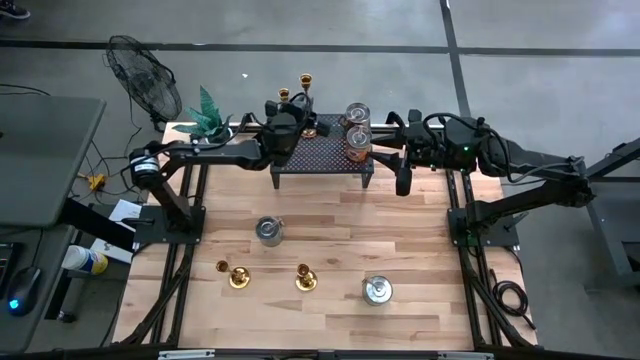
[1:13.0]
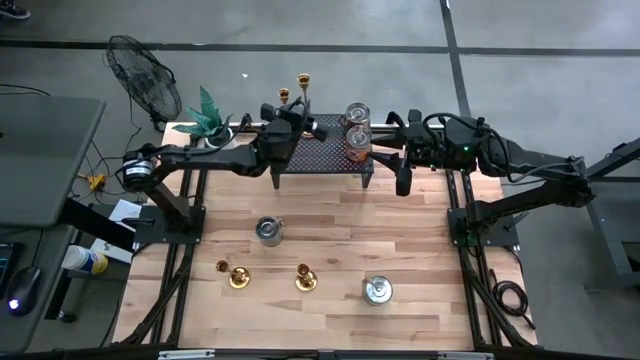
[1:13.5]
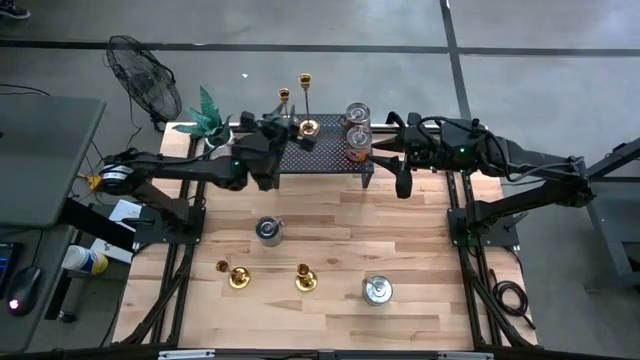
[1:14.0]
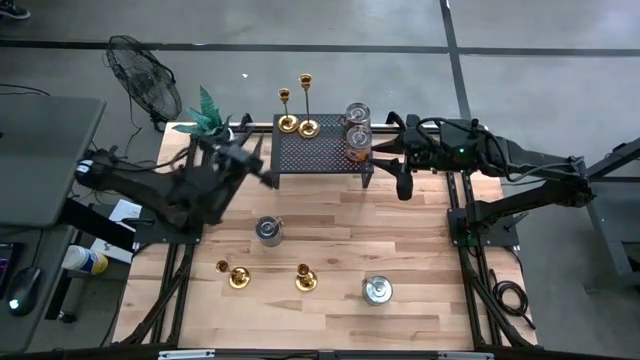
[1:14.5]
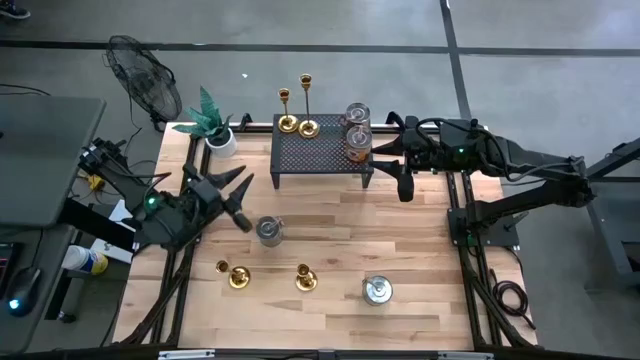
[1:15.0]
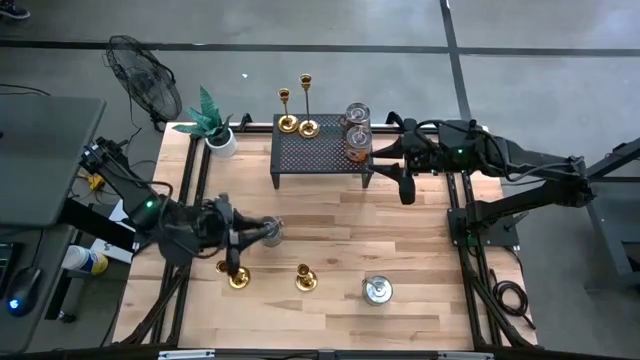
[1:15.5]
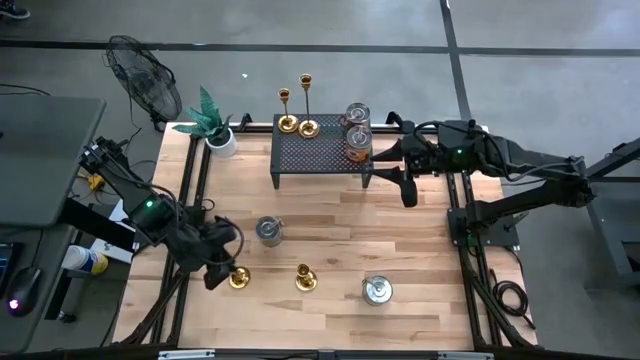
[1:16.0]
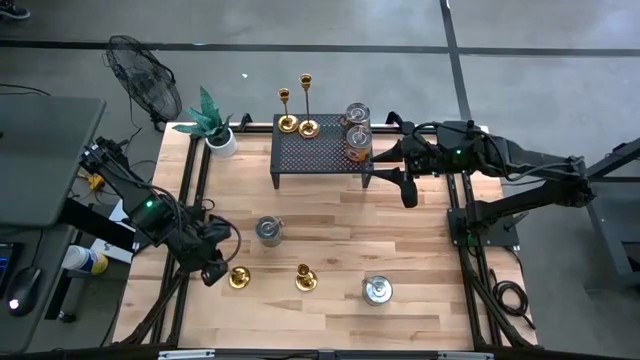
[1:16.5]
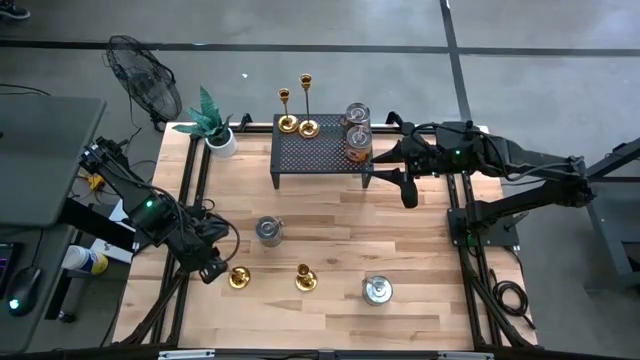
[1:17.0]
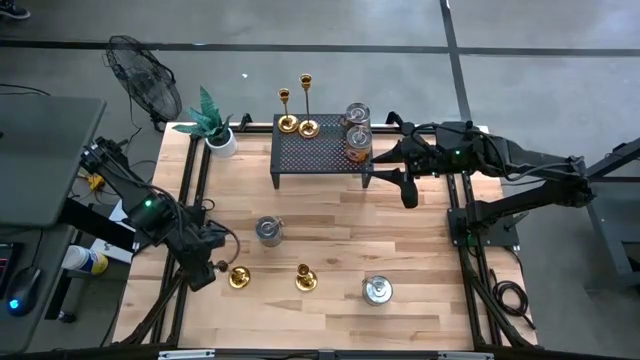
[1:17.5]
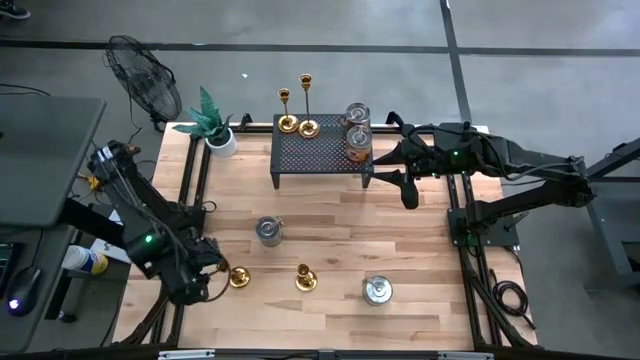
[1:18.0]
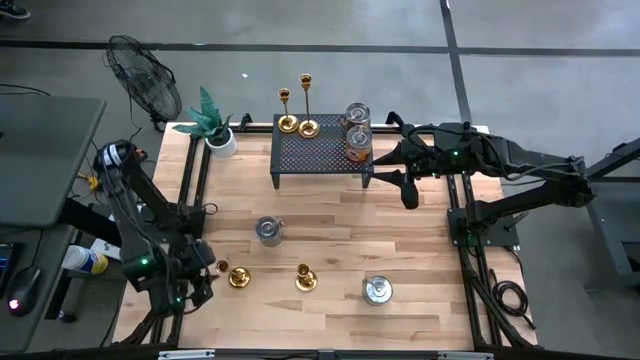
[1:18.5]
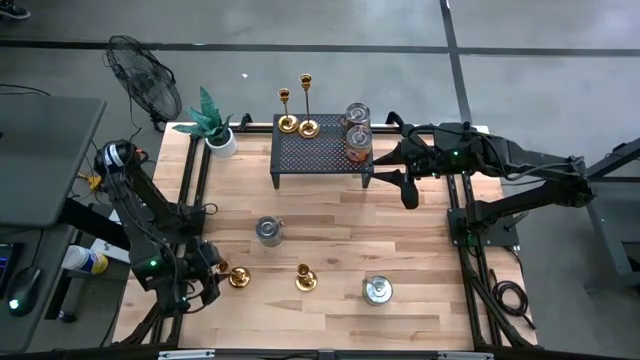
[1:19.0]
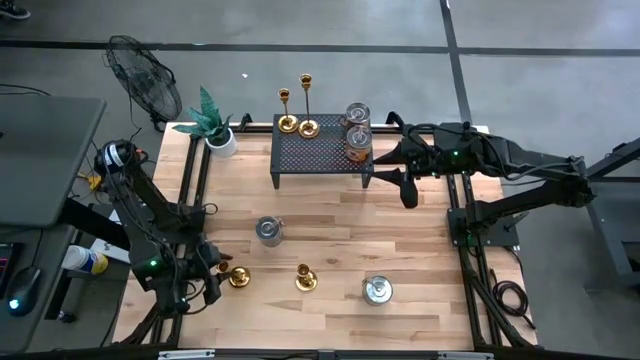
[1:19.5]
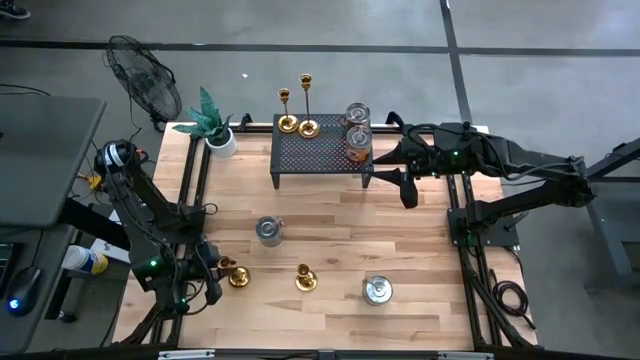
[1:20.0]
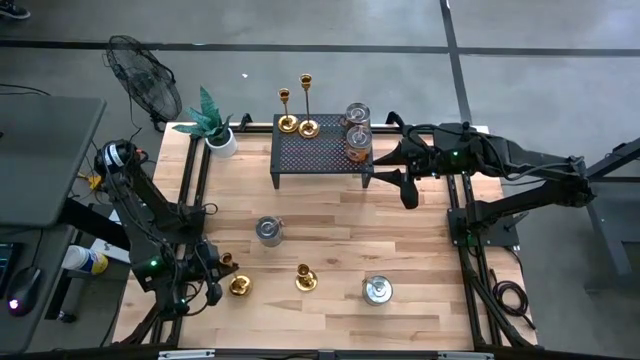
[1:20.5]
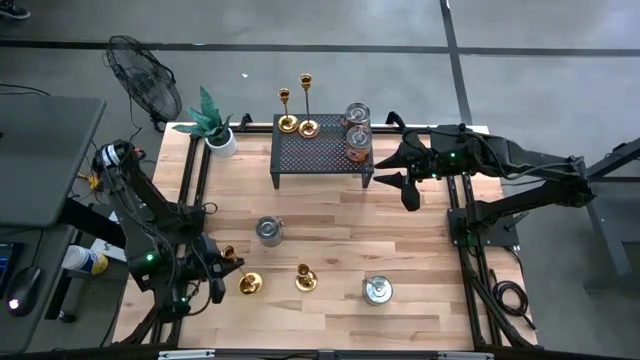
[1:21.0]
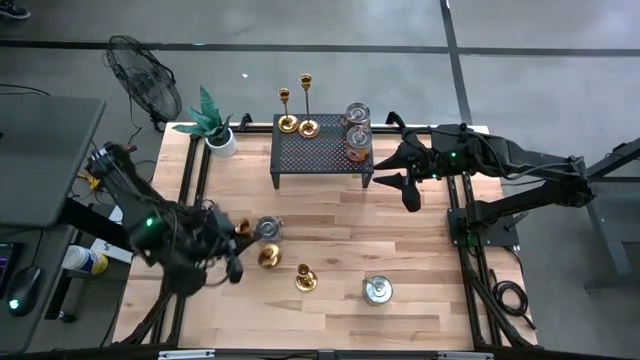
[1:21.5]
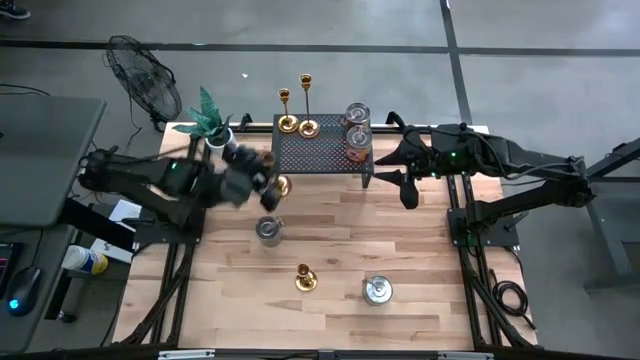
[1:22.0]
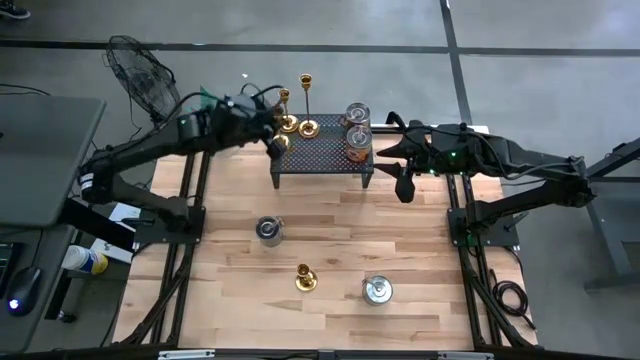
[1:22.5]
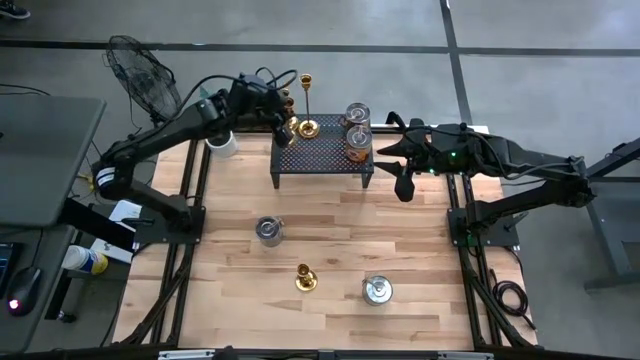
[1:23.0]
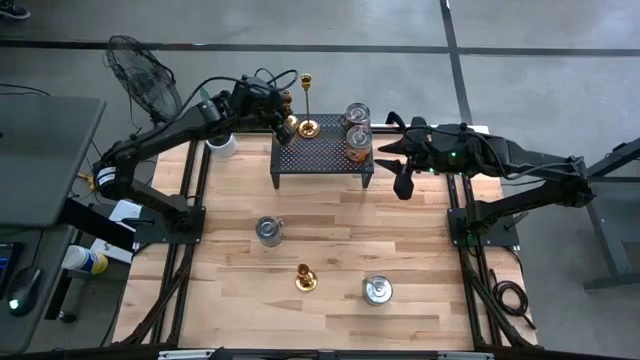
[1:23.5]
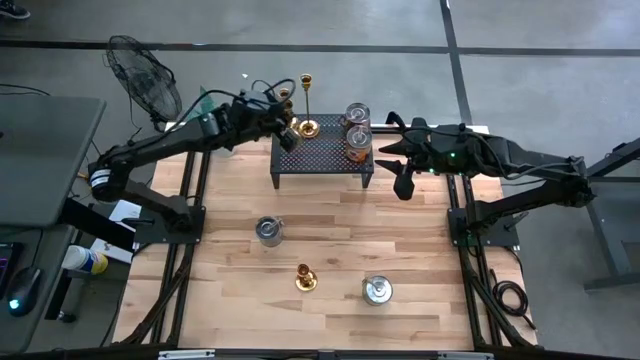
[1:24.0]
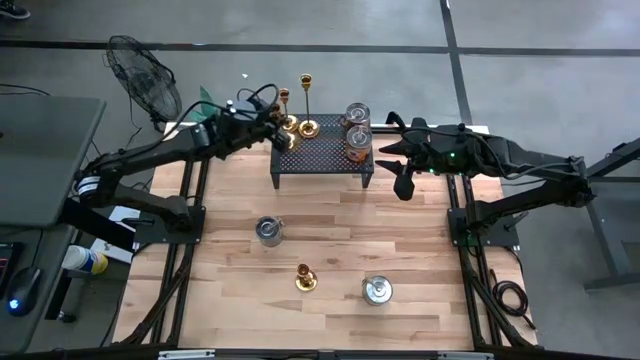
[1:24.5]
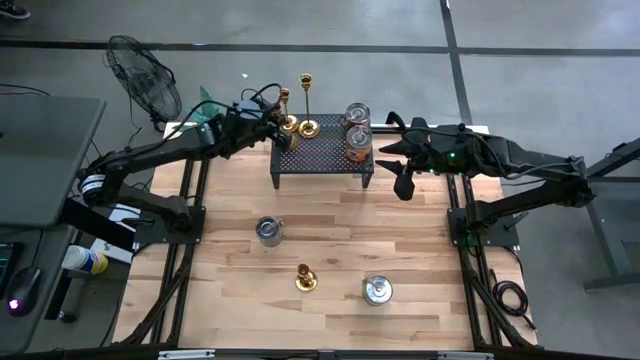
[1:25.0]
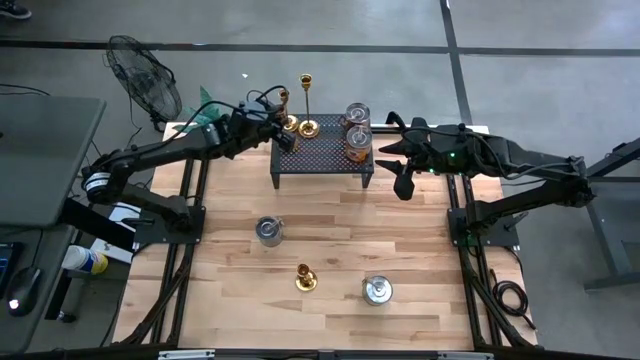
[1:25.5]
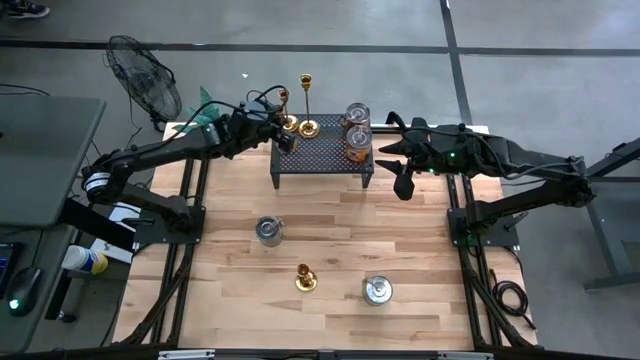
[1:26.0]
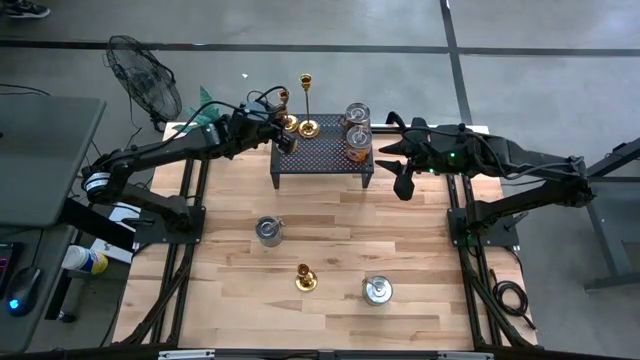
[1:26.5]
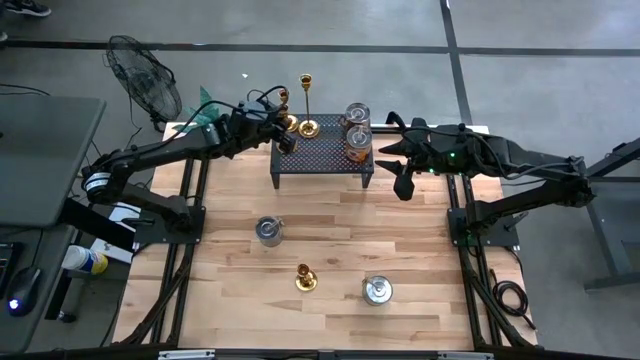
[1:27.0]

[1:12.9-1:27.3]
Task: Pick & Place candle stick holders
Put the gold candle holder on the shelf

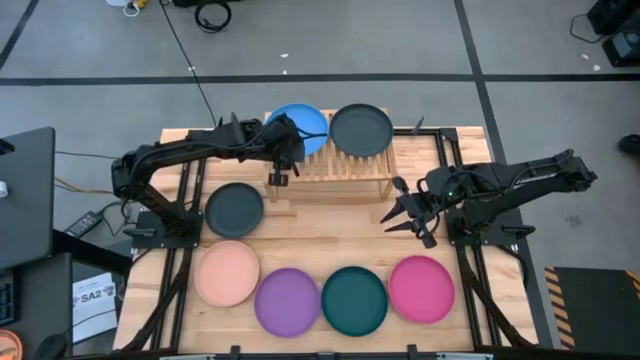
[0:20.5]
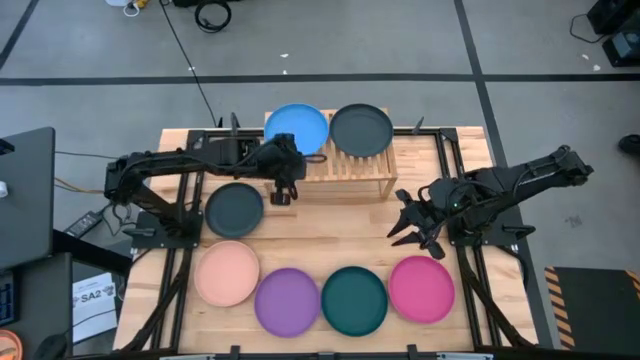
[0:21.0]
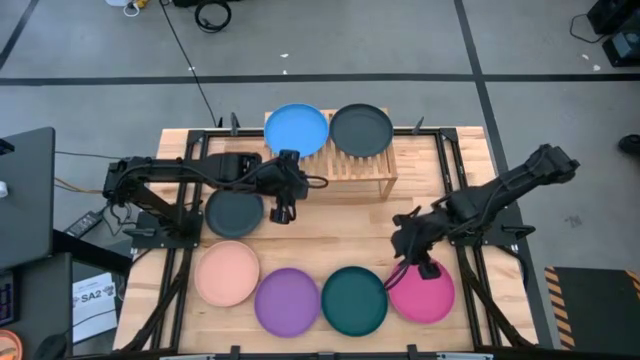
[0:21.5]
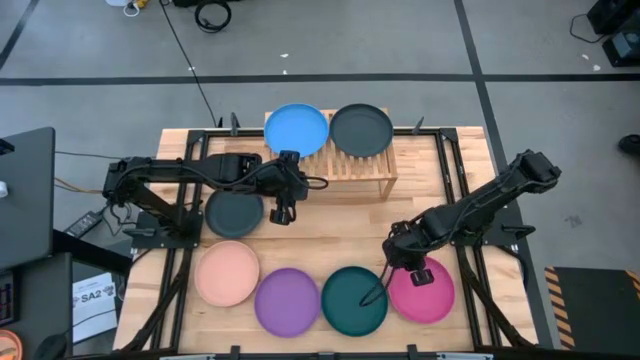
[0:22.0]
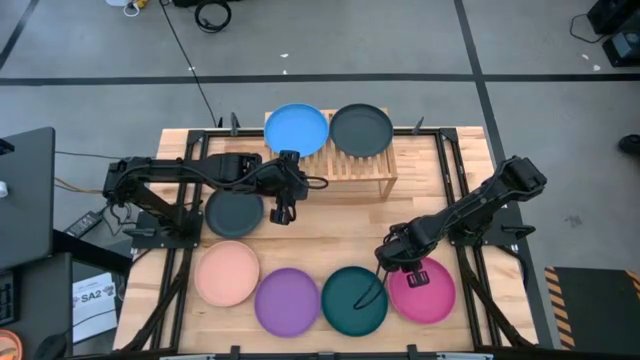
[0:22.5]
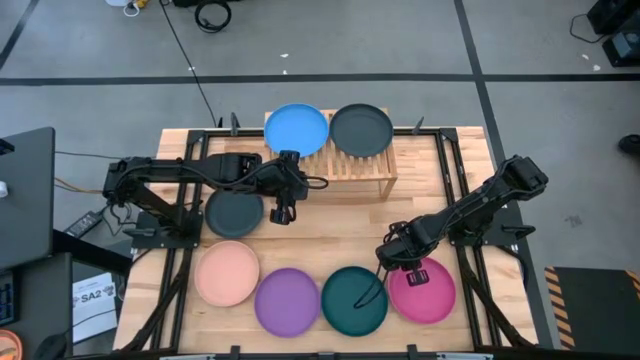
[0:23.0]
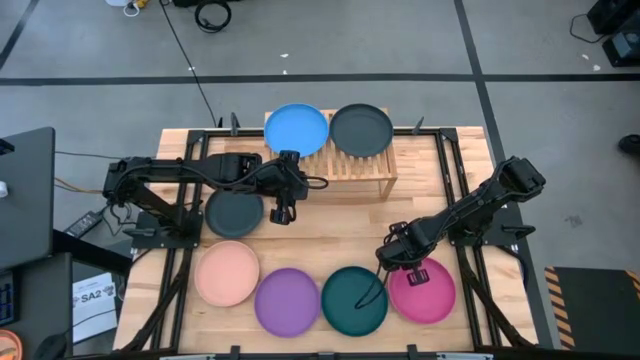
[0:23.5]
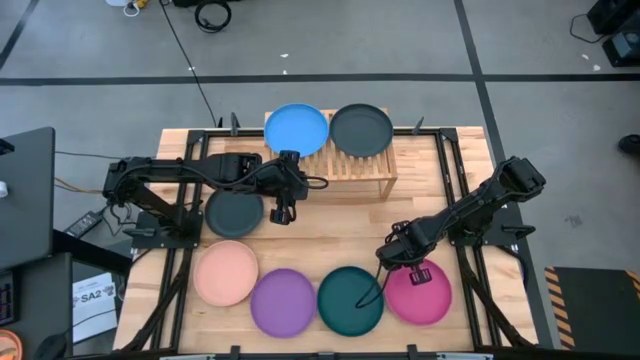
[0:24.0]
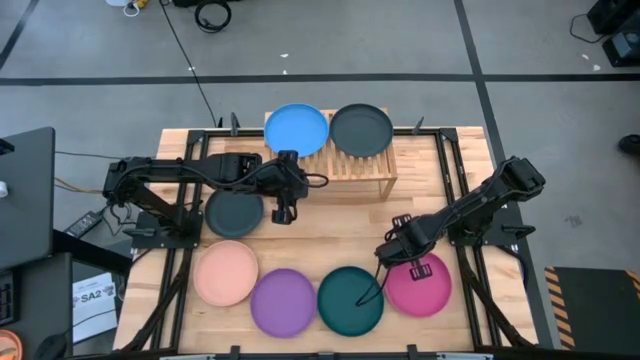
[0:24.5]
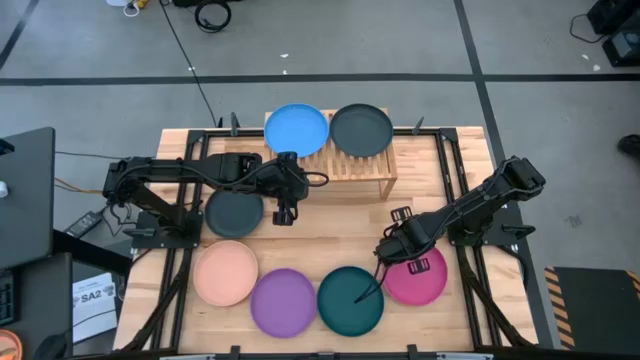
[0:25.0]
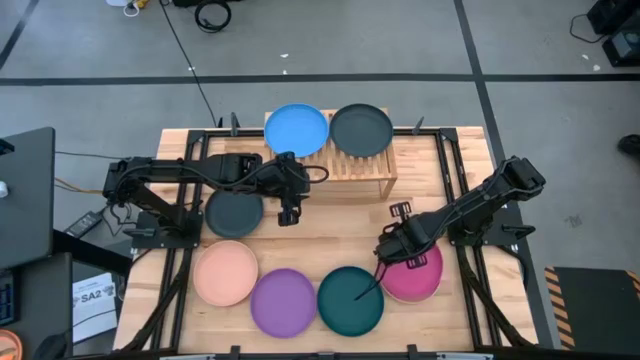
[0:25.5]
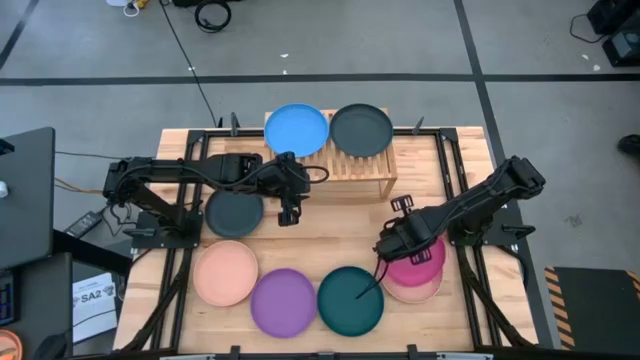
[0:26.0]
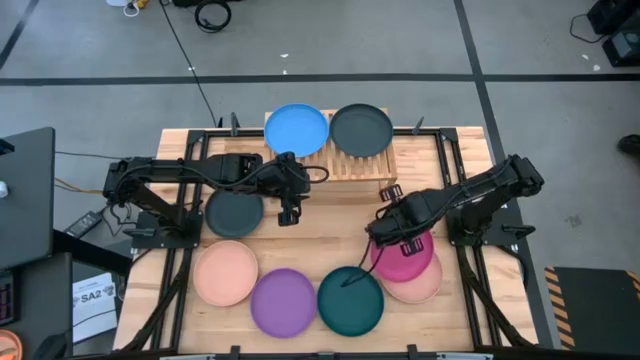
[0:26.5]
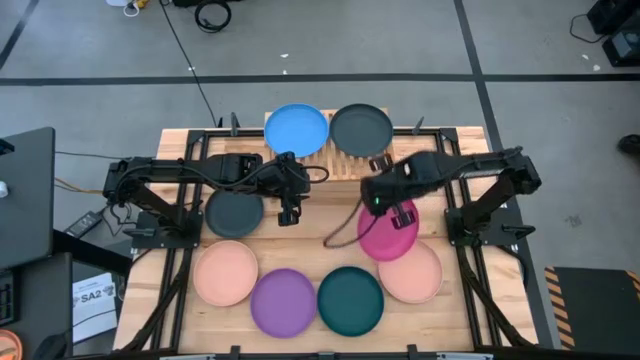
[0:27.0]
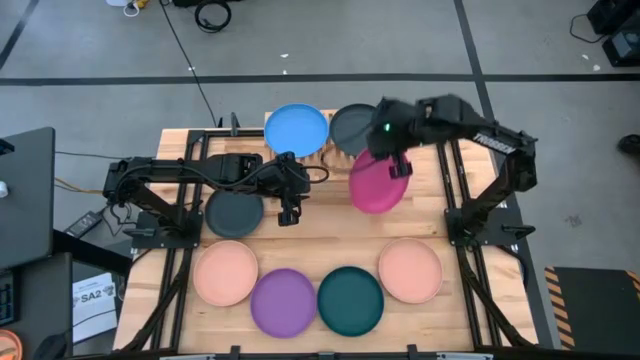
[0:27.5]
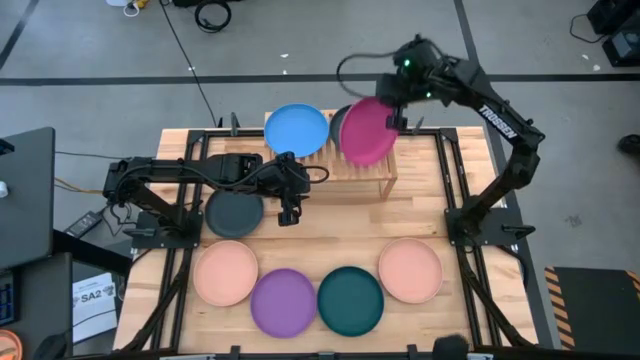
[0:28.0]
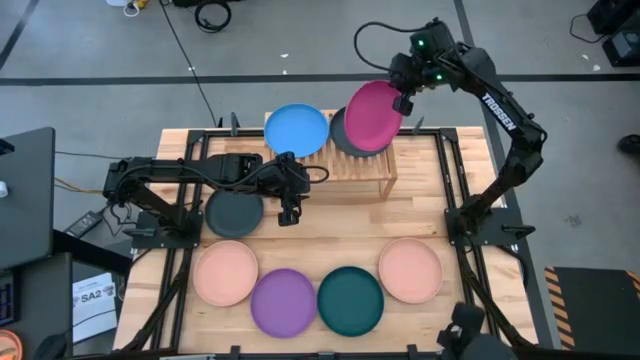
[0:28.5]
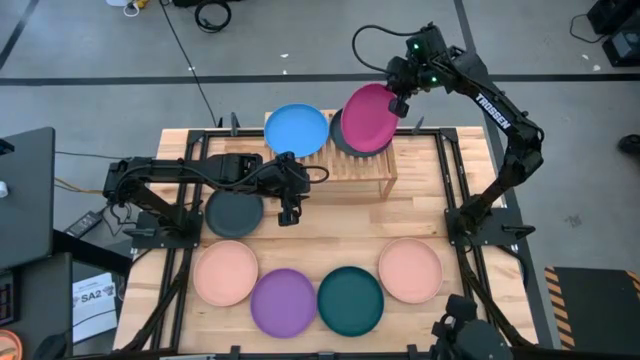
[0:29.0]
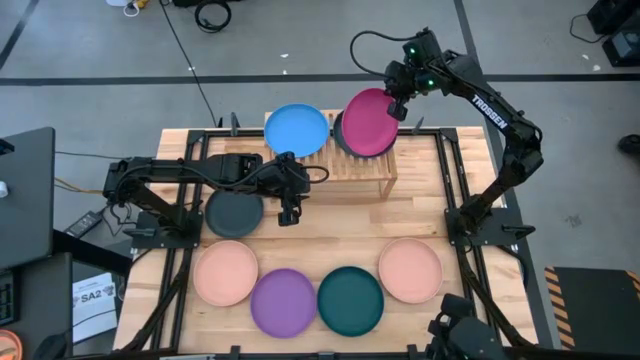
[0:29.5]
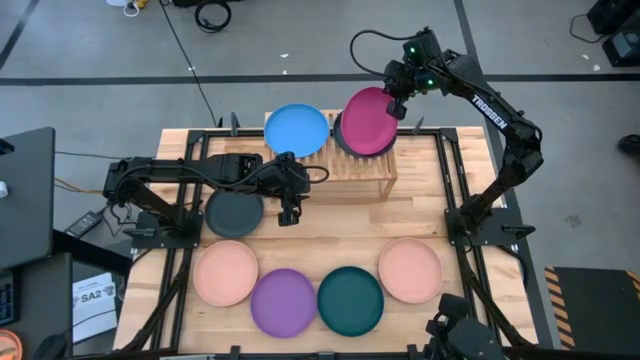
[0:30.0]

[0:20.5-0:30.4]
Task: Place and stack plates onto a shelf
Stack the pink plate on the black plate on the shelf
